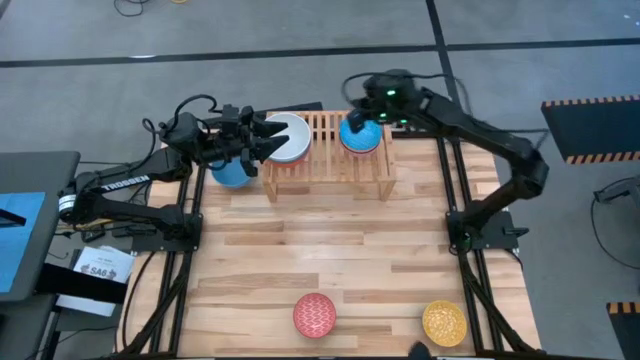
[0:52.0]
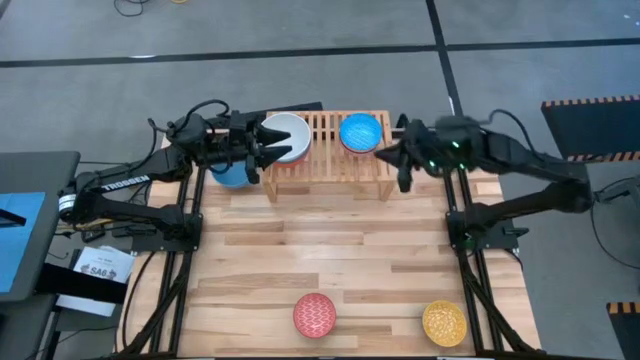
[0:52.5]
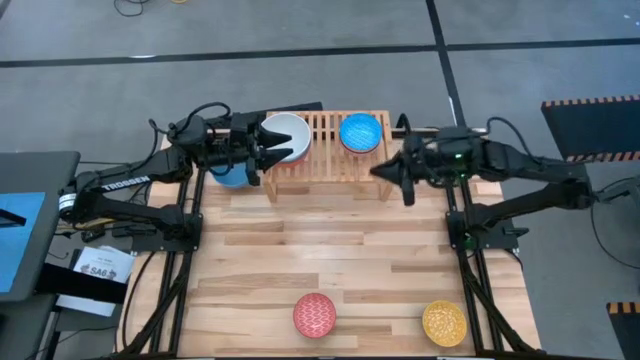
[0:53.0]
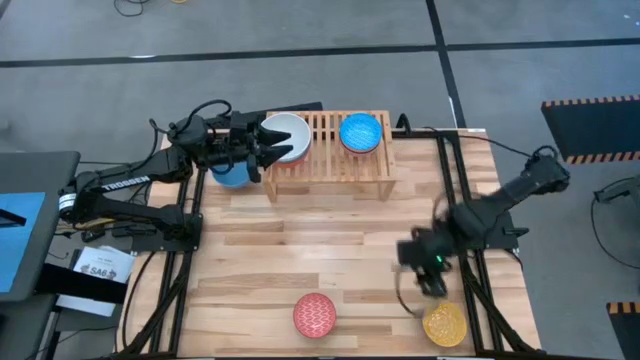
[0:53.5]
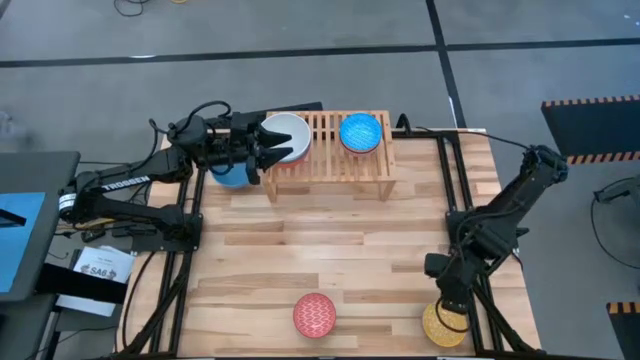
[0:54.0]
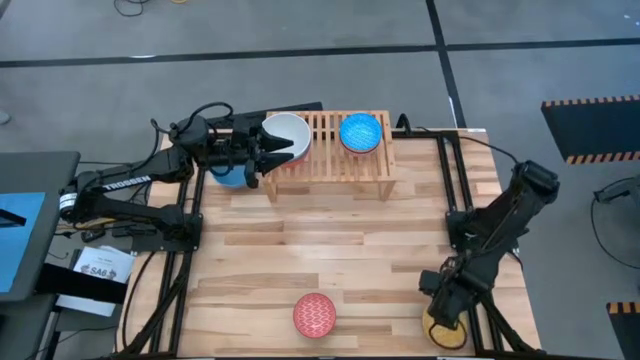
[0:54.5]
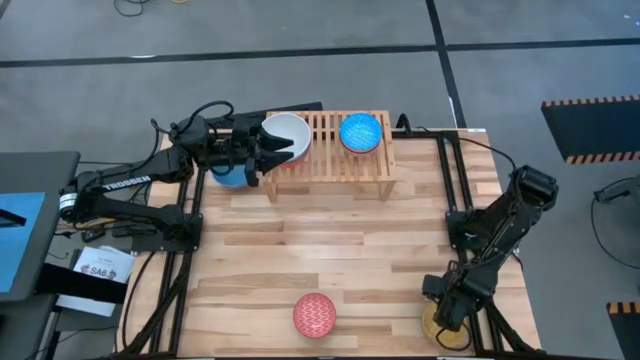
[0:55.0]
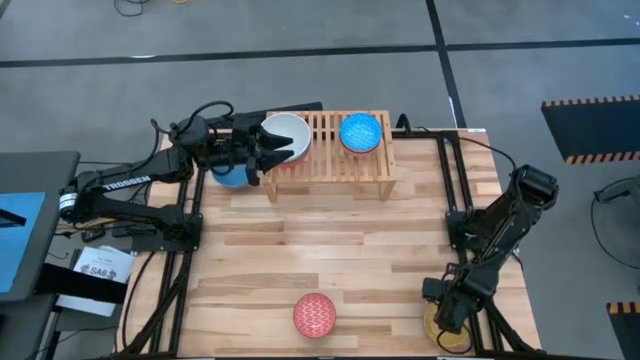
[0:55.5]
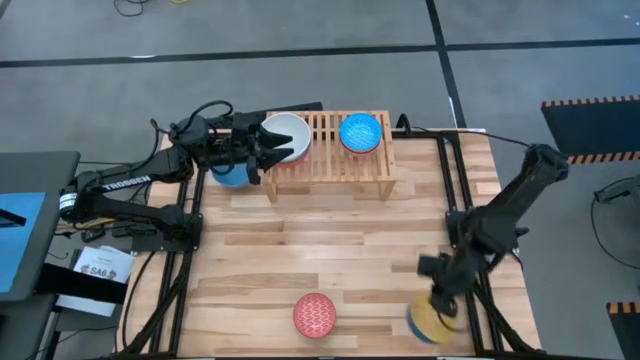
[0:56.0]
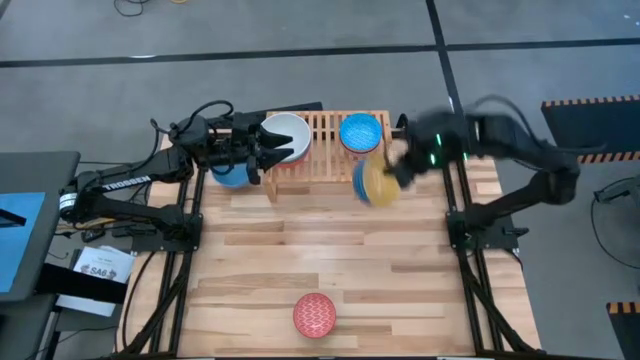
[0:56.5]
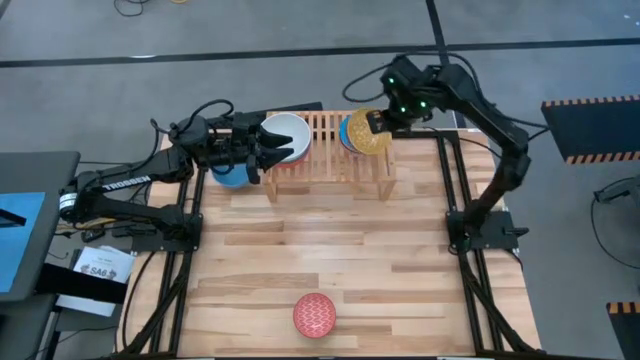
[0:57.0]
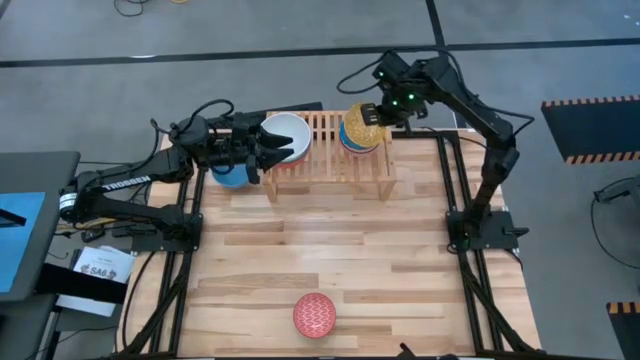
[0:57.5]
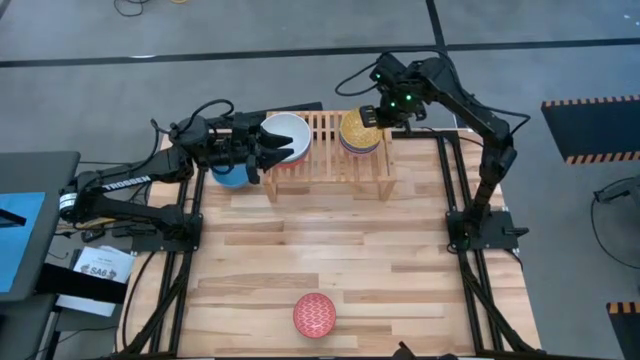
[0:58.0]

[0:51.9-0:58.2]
Task: Place and stack bowls onto a shelf
Stack the small yellow bowl on top of the small light blue bowl on the shelf

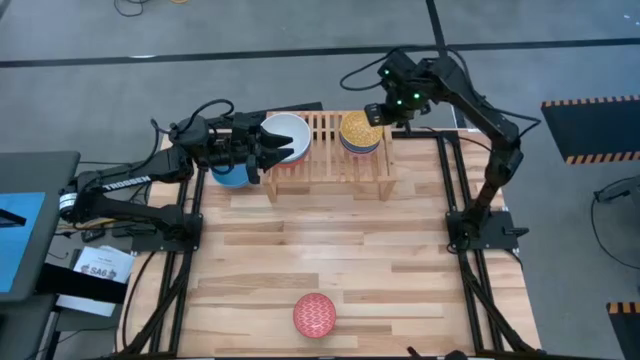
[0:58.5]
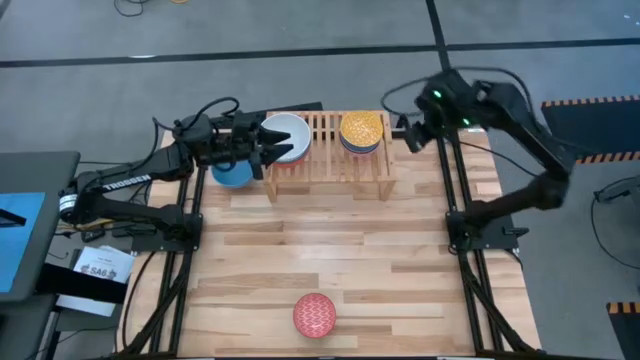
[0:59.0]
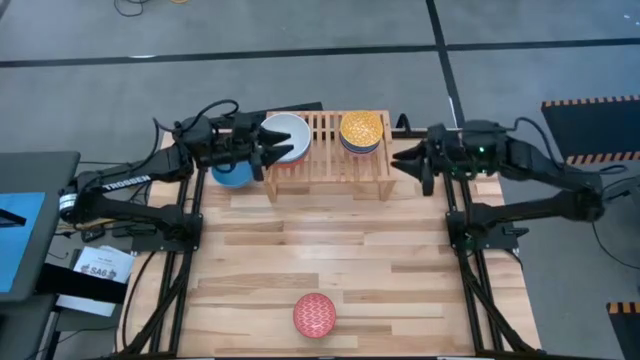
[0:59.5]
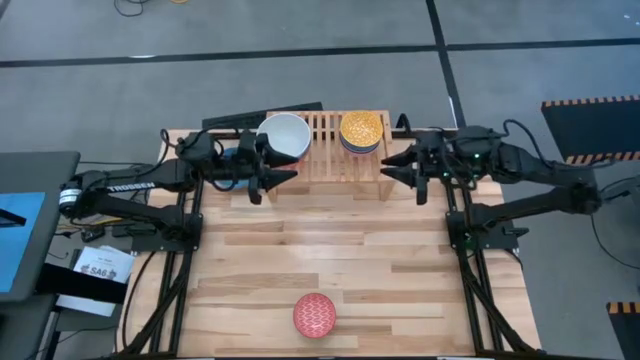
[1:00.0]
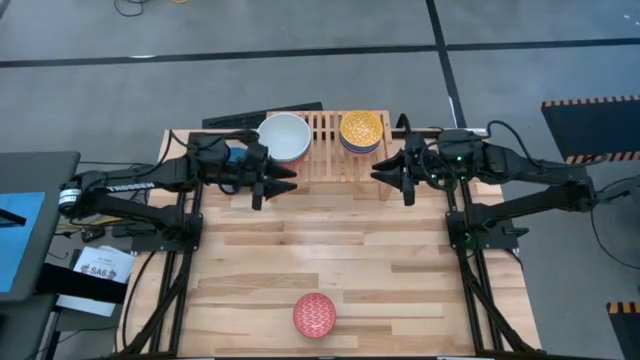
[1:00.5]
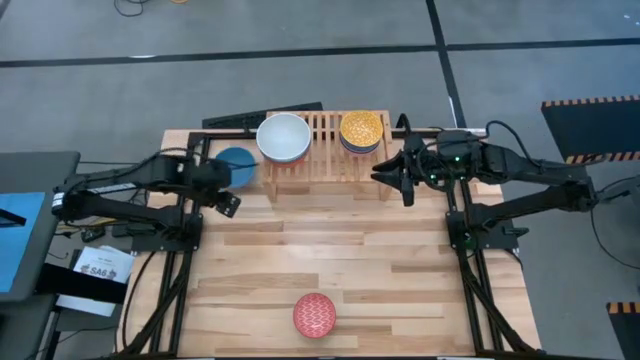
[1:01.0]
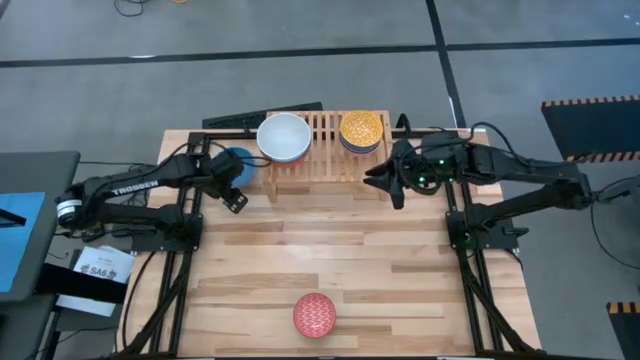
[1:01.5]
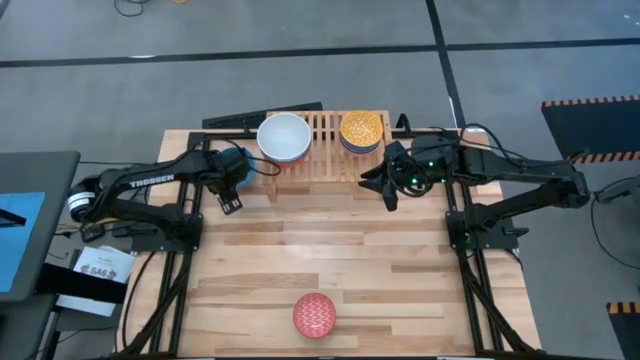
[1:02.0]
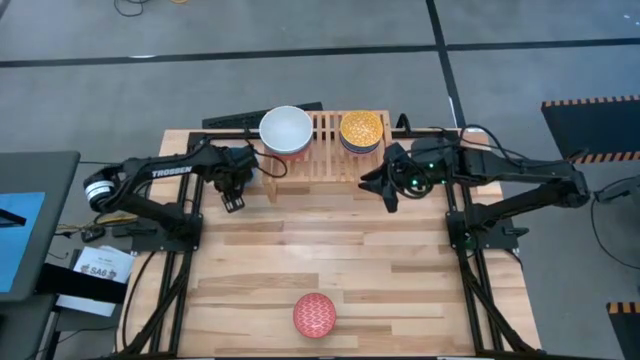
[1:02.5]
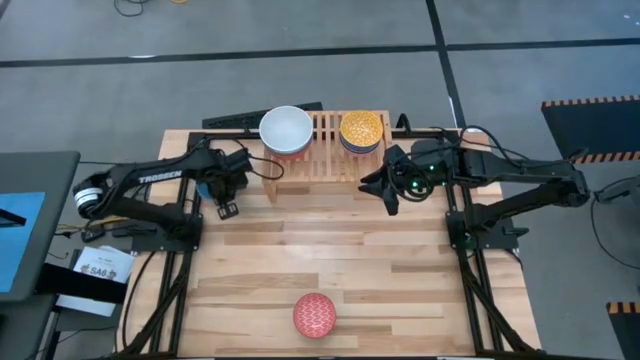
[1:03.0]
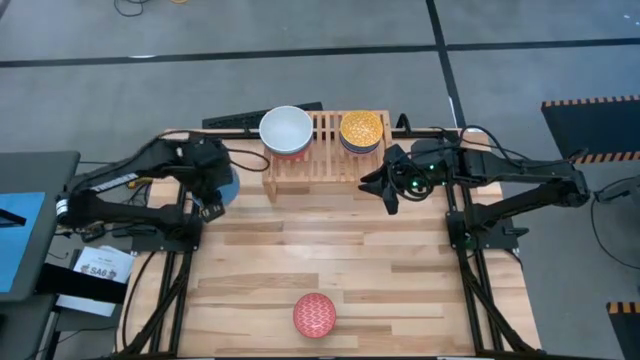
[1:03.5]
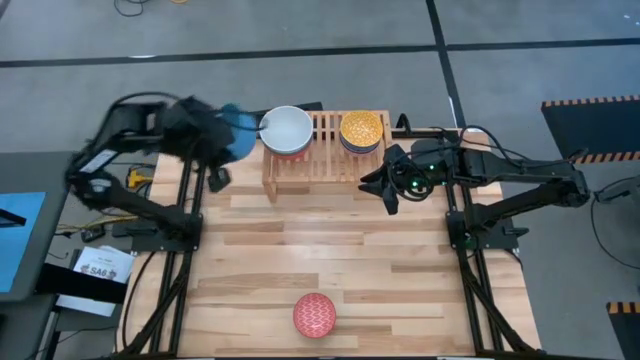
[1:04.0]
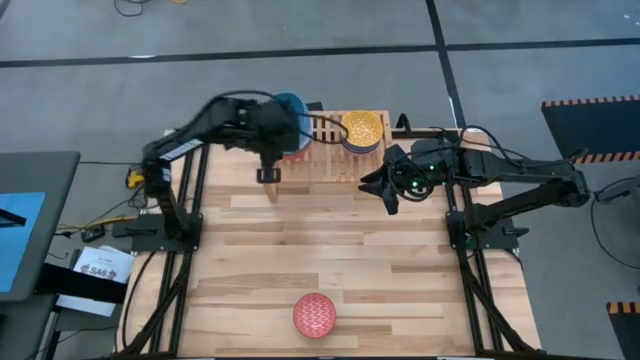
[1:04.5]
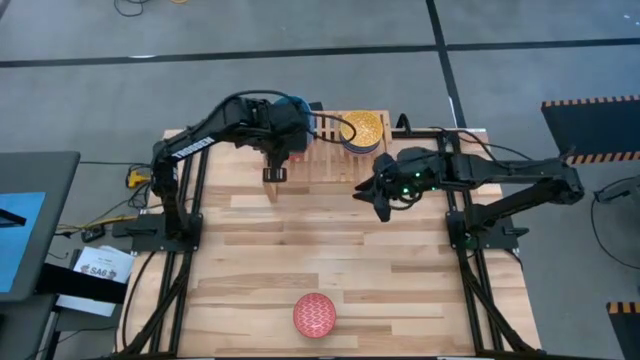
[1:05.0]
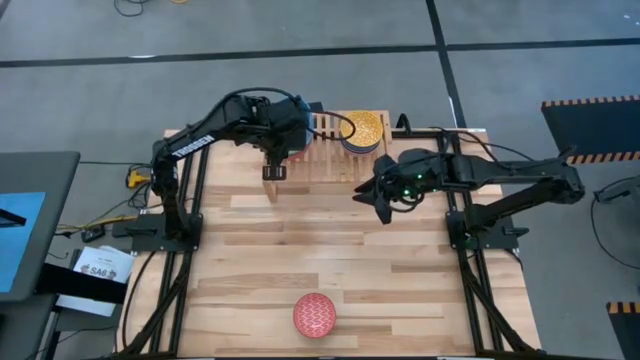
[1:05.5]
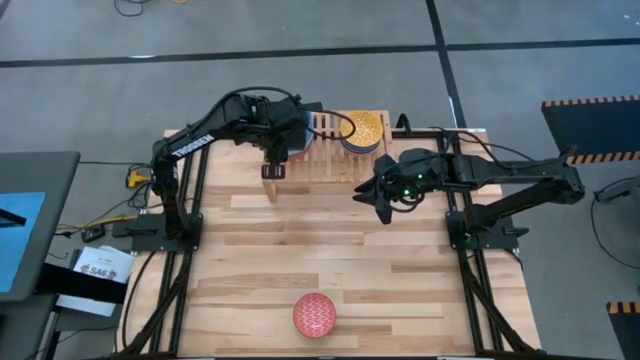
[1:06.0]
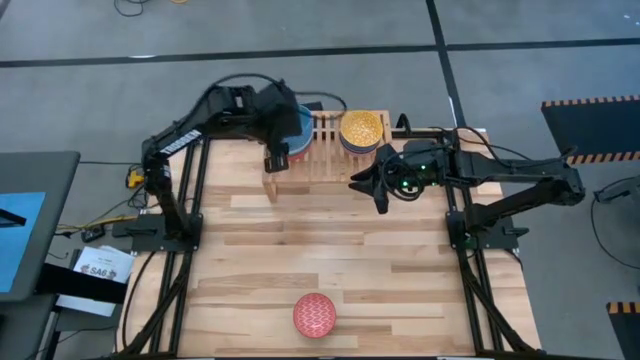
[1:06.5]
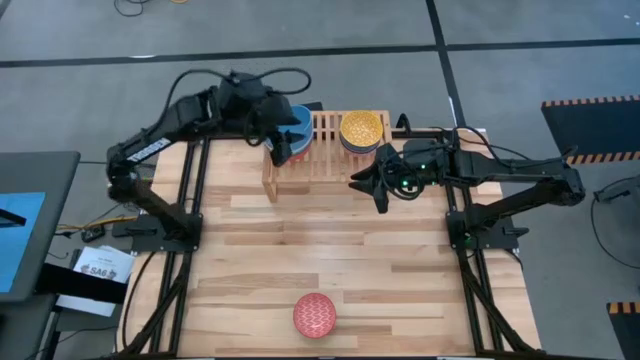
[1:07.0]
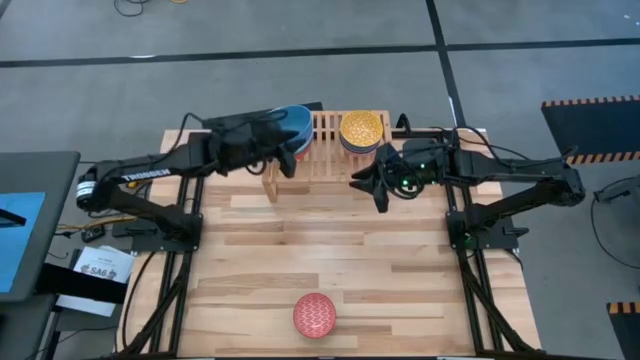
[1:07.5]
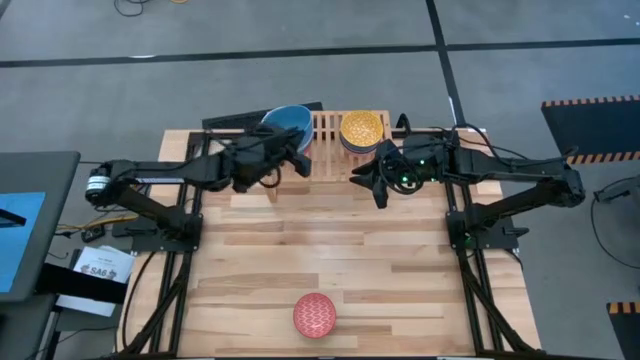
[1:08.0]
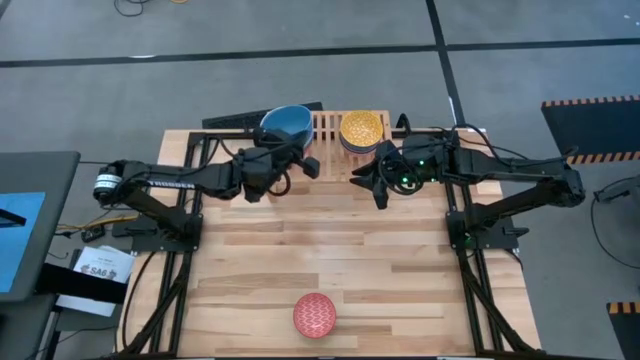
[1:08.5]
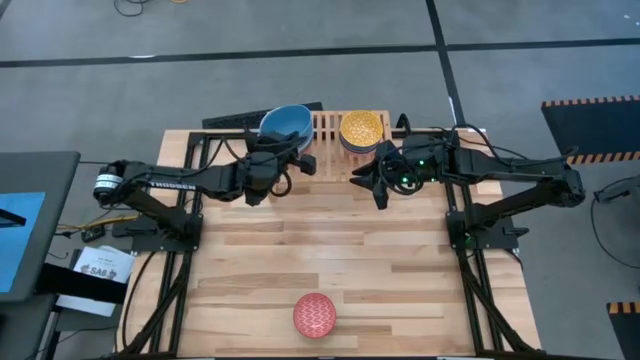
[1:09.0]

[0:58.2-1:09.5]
Stack the large blue bowl on top of the large white bowl on the shelf

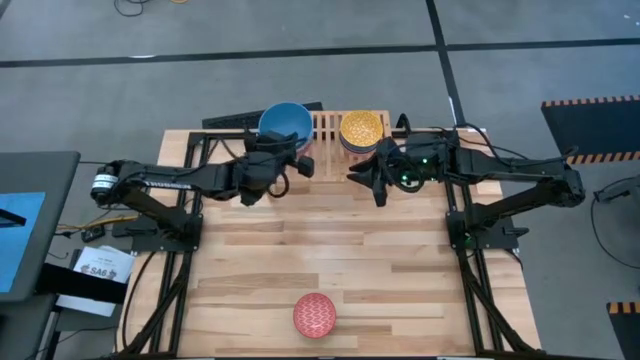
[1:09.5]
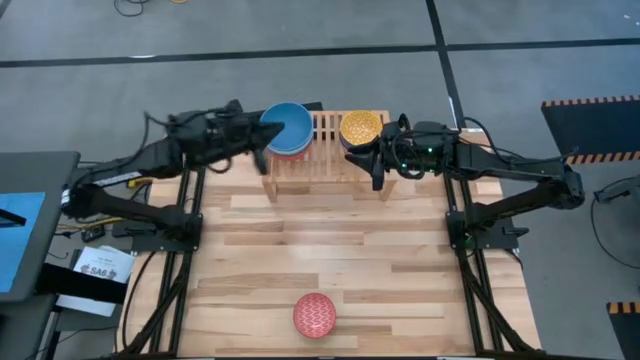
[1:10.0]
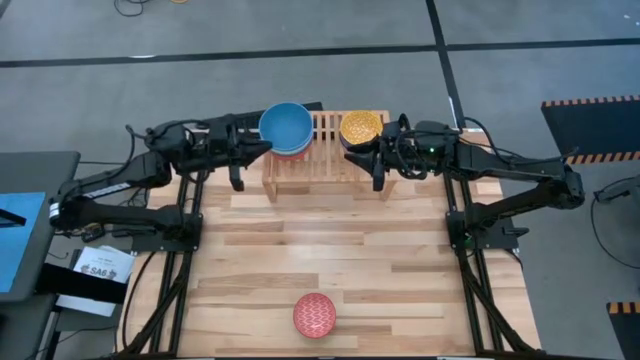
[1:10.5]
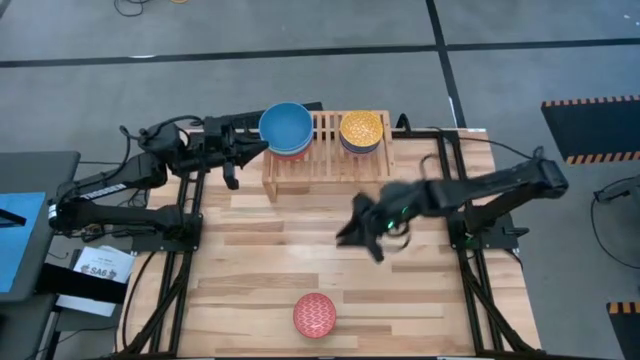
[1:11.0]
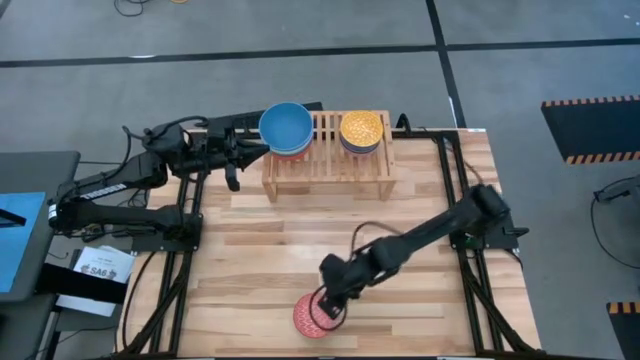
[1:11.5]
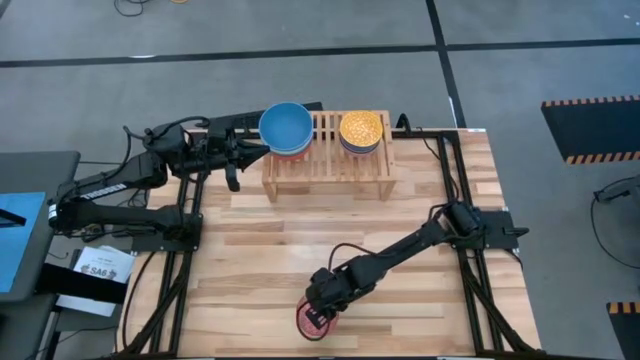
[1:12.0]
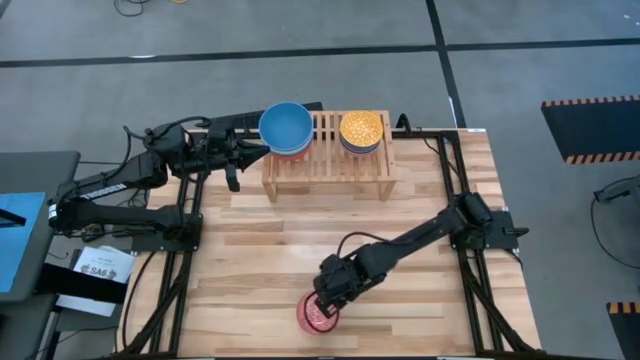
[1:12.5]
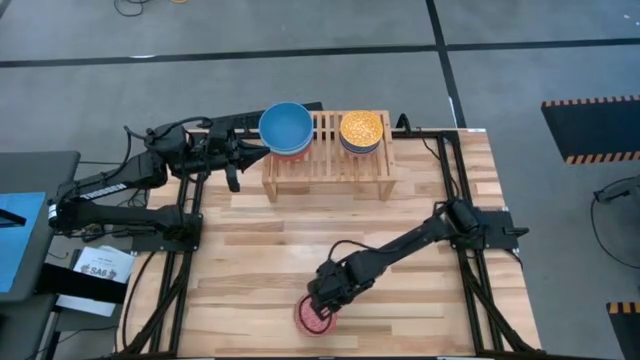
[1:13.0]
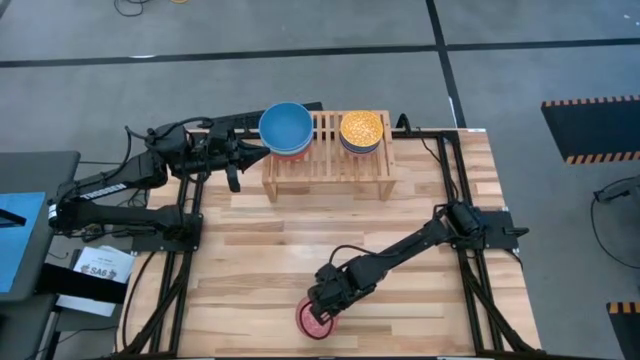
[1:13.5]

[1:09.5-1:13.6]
Stack the small red bowl on top of the small yellow bowl on the shelf
